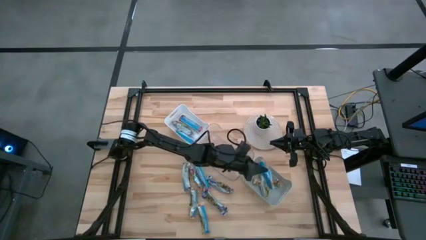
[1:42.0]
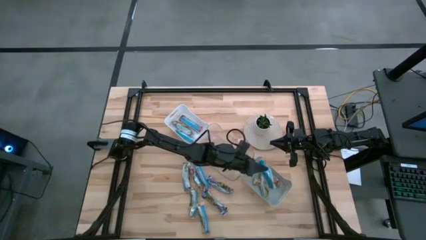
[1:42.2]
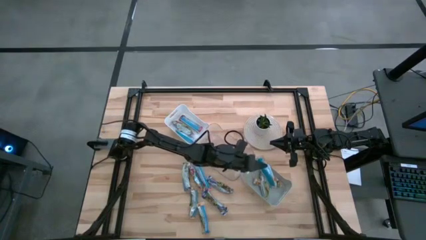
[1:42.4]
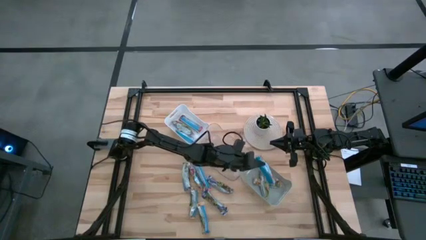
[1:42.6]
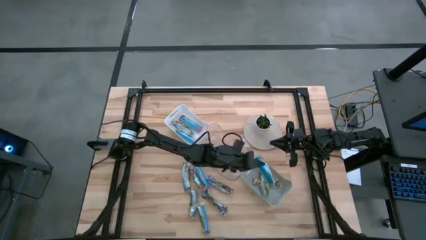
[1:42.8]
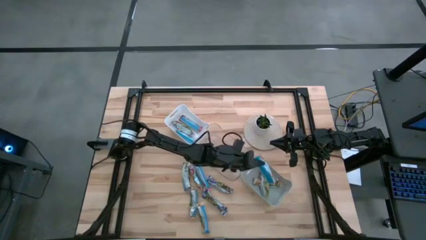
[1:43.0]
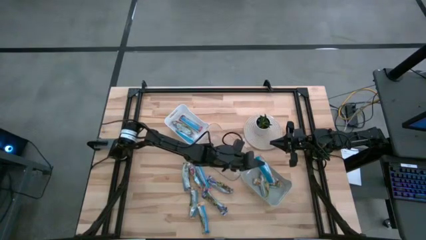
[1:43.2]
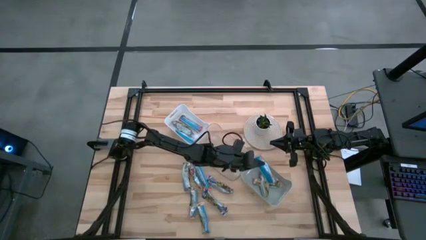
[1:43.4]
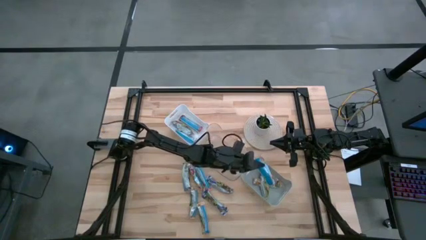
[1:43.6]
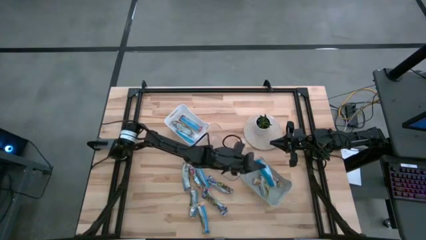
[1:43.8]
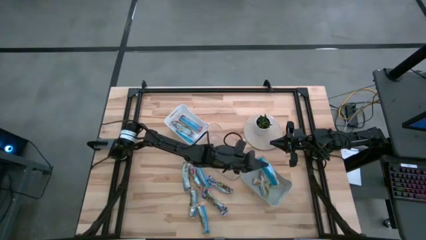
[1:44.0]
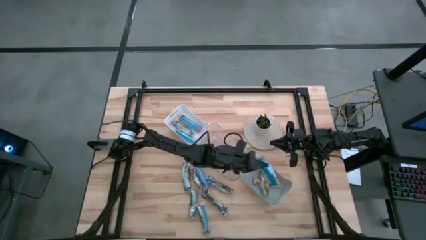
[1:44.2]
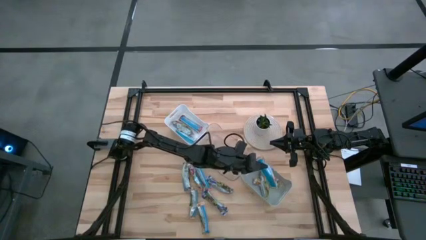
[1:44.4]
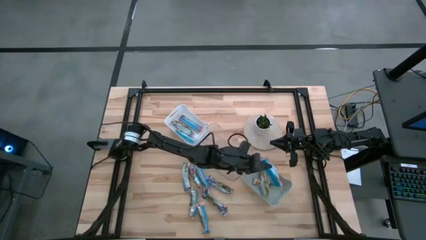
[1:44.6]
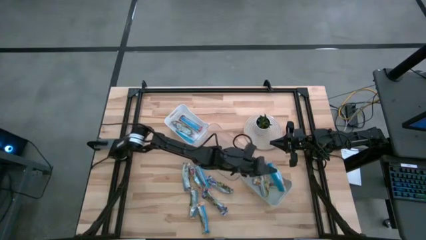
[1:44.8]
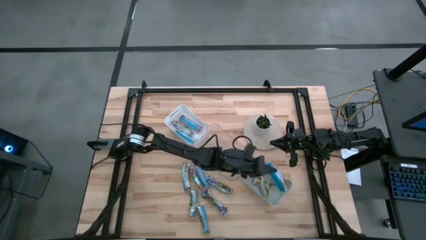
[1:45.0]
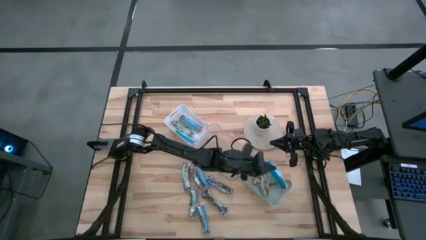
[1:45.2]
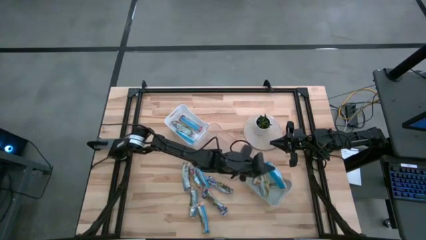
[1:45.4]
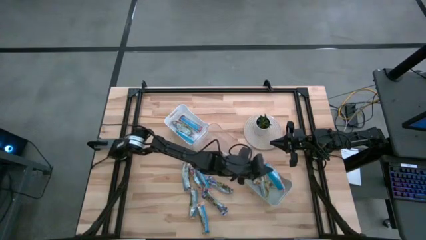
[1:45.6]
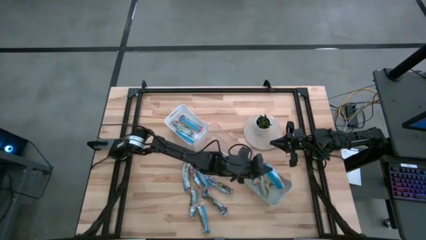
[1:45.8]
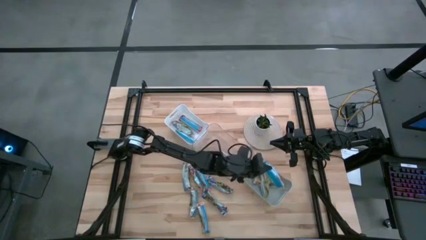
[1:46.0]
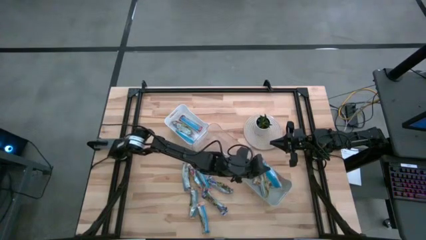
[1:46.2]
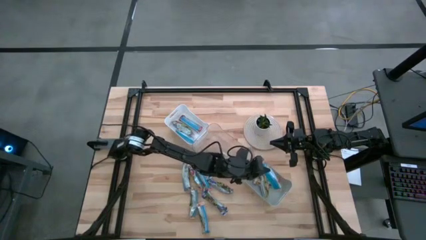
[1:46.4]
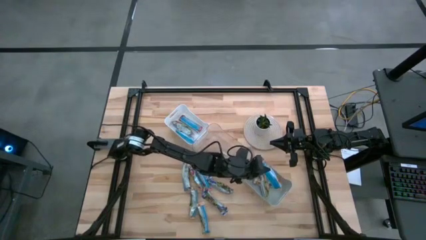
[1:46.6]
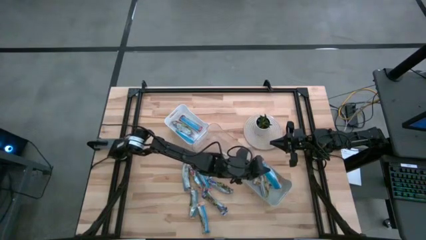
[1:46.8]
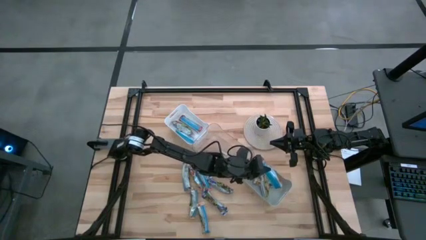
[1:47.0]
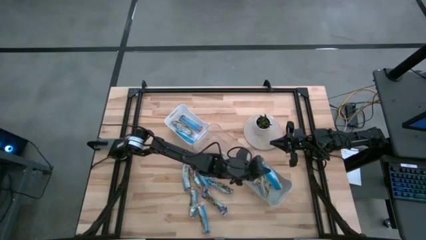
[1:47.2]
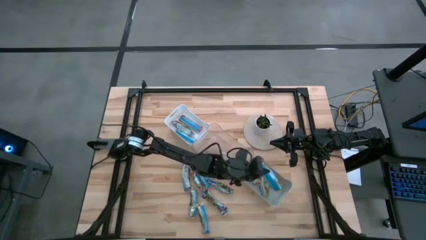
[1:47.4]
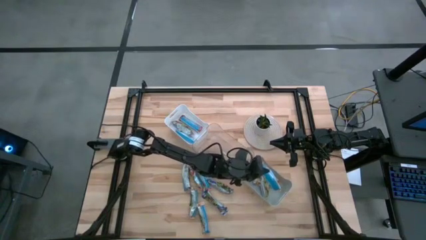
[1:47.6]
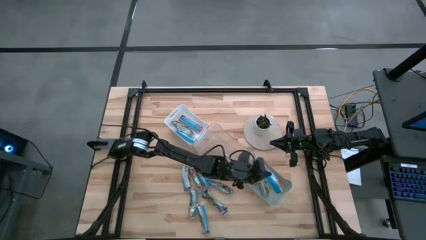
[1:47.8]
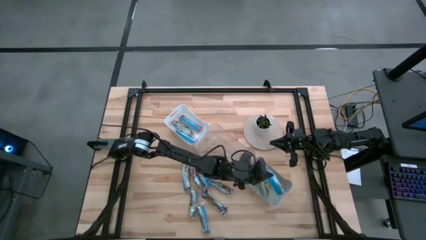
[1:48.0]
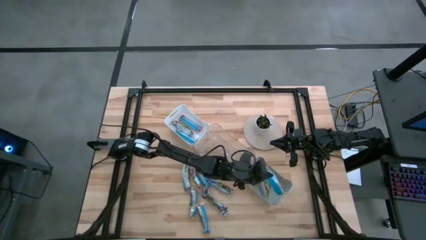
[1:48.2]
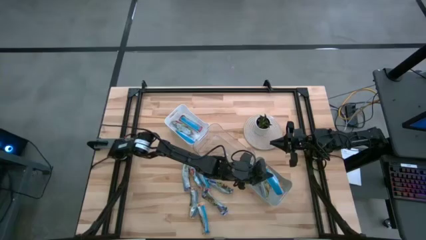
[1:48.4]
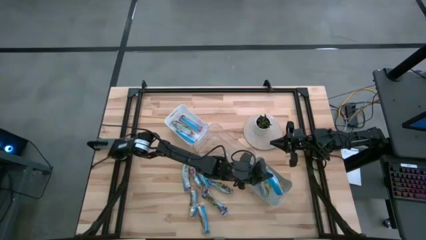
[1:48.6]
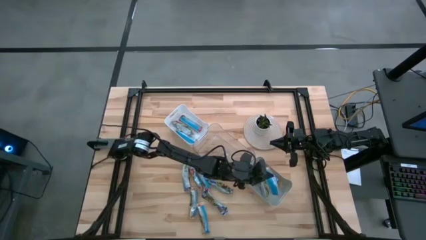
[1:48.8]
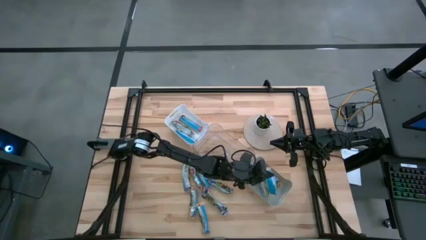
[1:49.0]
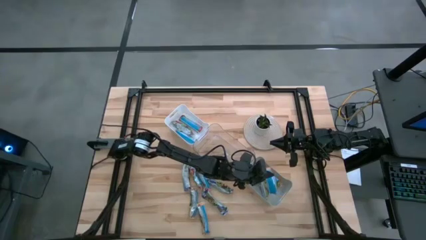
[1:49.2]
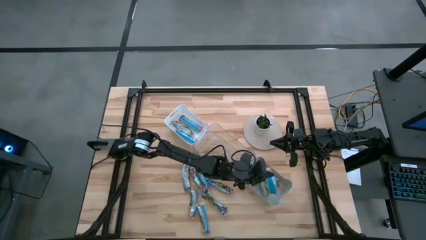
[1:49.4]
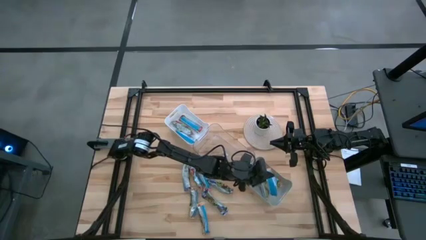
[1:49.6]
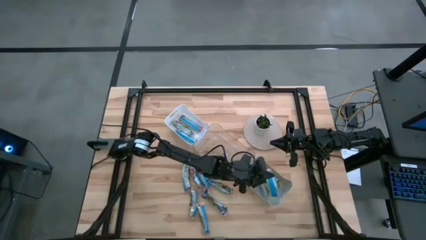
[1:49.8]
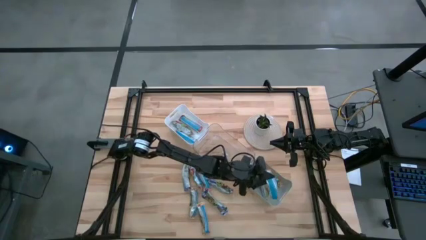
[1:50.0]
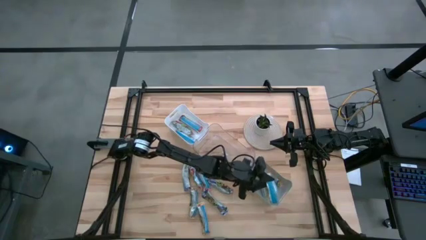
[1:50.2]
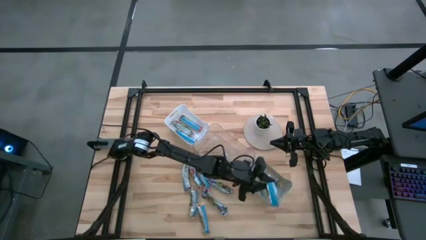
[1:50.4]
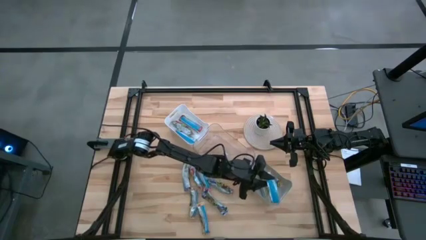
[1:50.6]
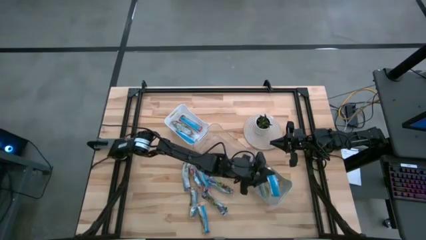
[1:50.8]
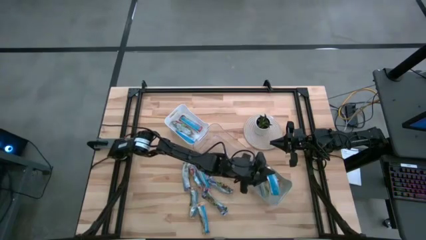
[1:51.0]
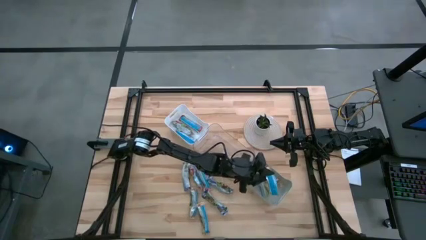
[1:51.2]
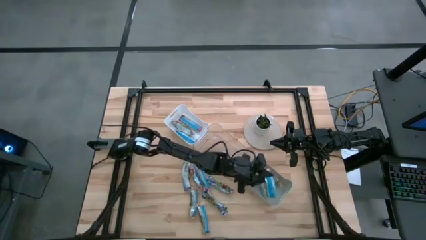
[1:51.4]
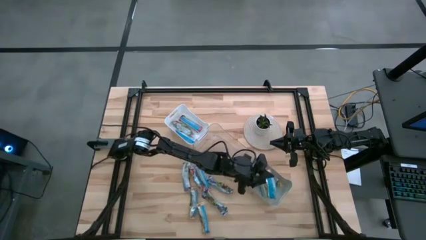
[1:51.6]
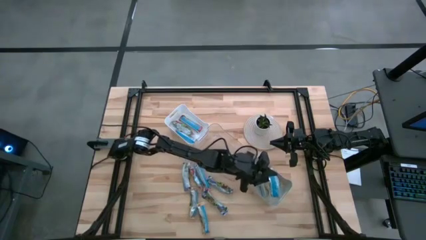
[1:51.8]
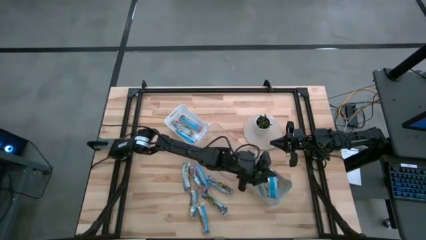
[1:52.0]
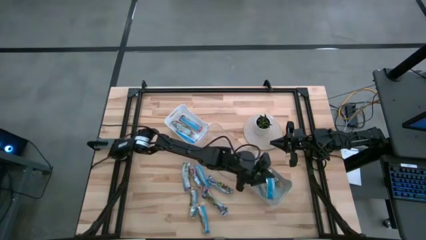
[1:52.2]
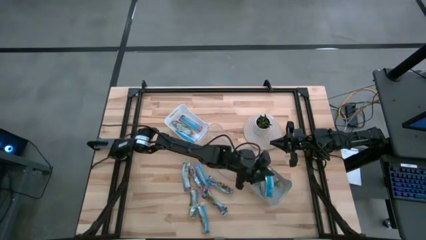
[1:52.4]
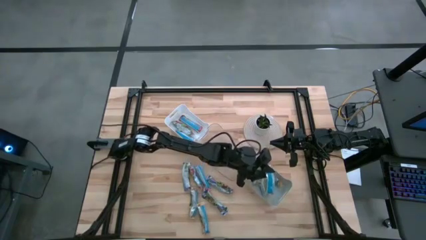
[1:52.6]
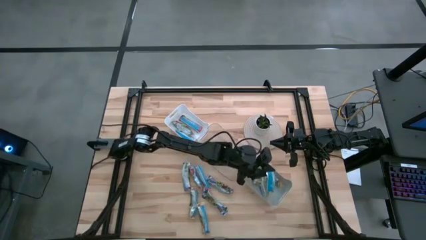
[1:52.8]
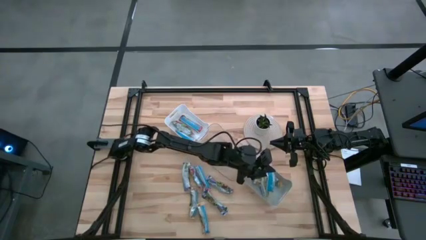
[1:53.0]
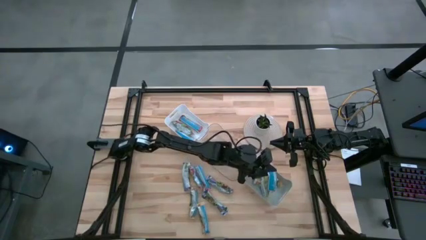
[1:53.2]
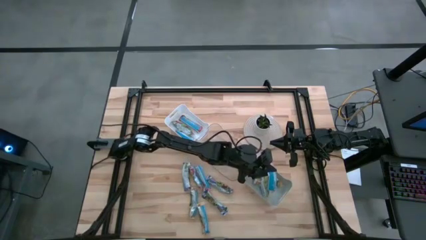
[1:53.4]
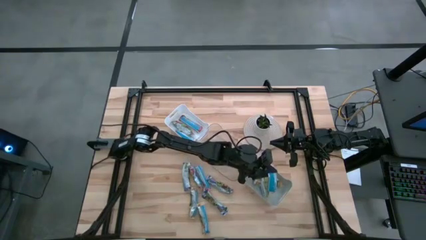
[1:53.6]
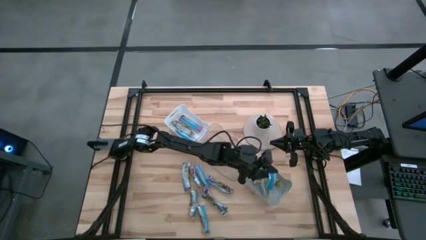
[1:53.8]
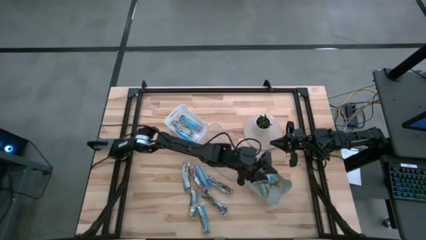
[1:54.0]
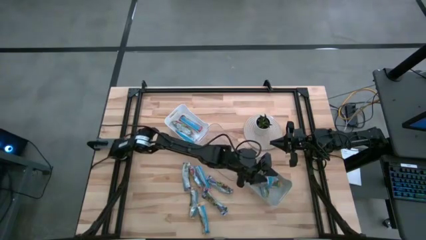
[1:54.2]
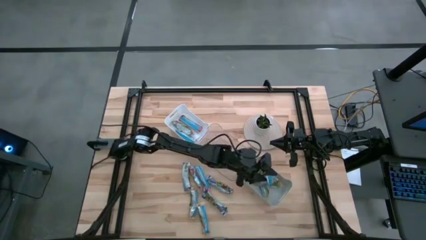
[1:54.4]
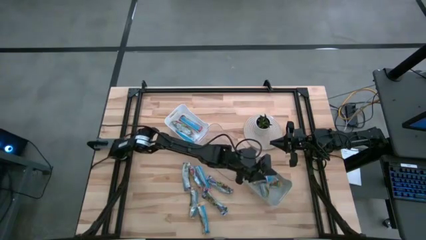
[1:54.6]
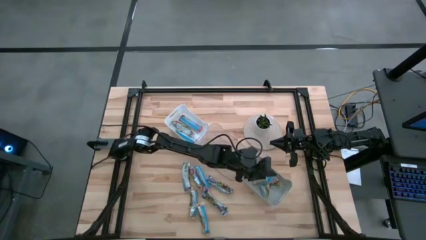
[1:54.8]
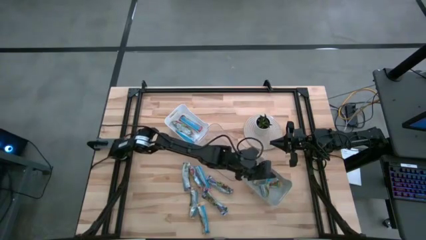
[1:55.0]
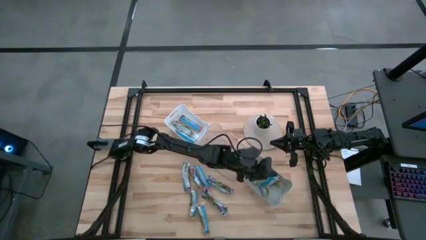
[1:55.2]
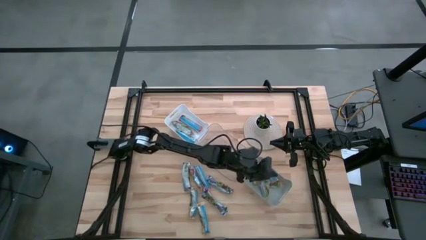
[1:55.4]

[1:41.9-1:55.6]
Task: Pick and place Granola Bars by type
Put the orange granola bar into the gray bin

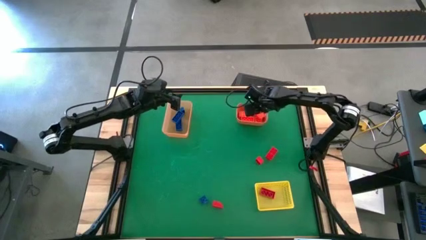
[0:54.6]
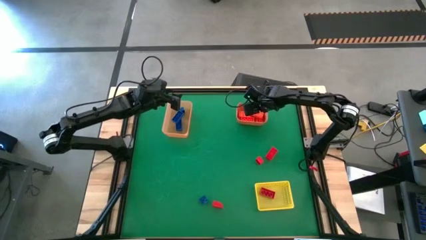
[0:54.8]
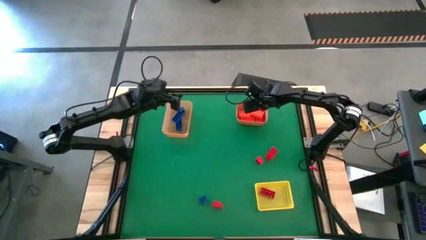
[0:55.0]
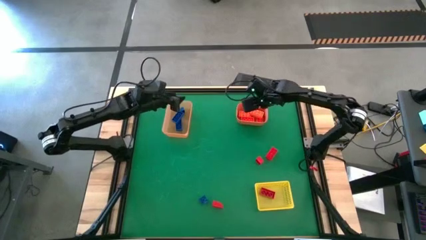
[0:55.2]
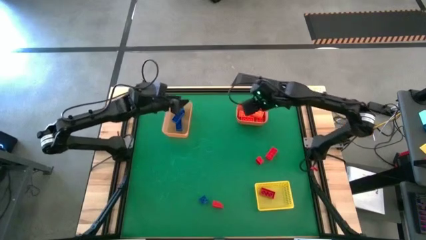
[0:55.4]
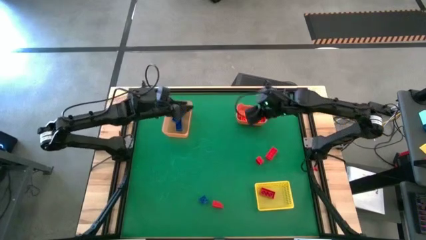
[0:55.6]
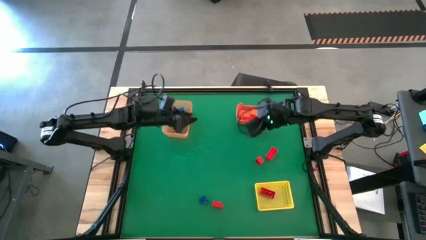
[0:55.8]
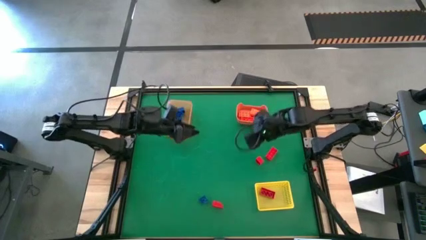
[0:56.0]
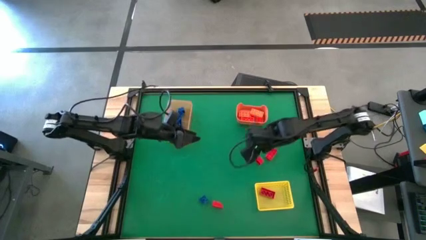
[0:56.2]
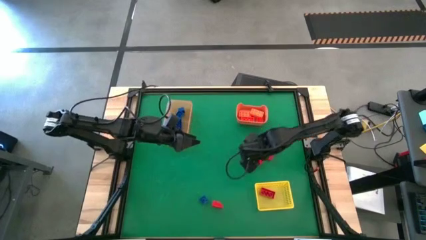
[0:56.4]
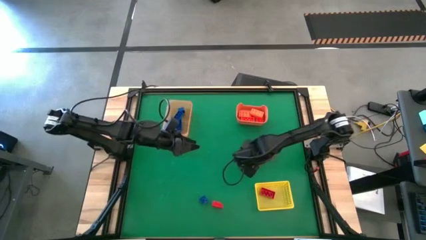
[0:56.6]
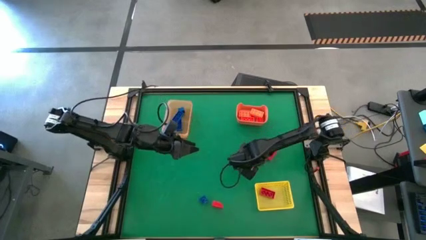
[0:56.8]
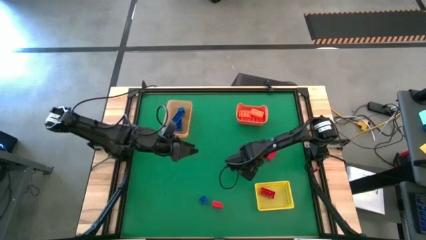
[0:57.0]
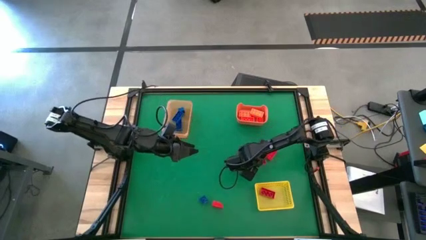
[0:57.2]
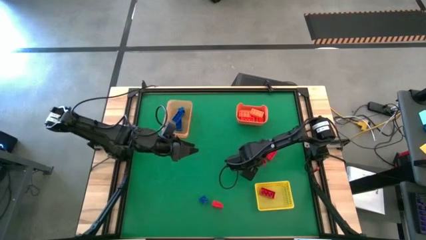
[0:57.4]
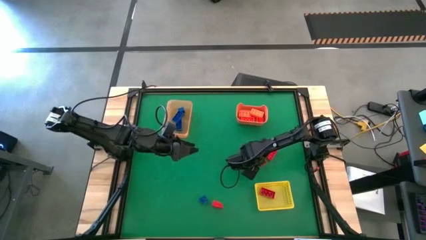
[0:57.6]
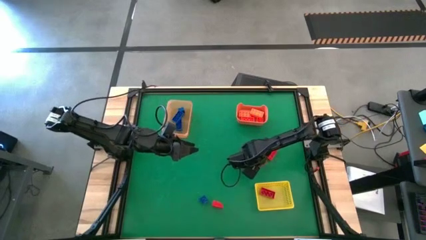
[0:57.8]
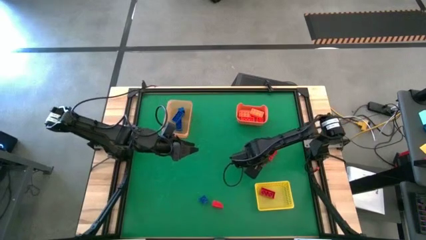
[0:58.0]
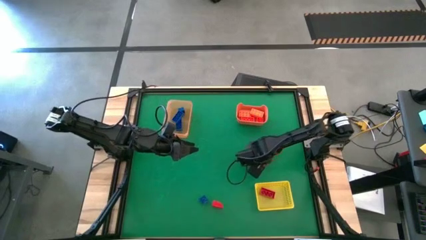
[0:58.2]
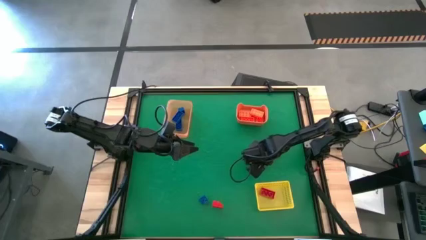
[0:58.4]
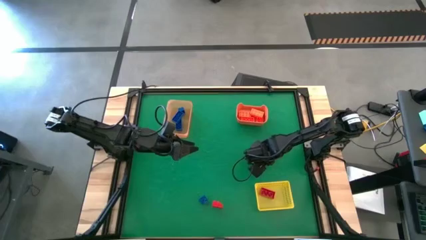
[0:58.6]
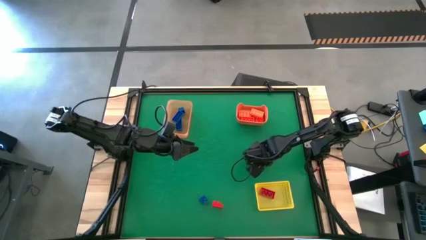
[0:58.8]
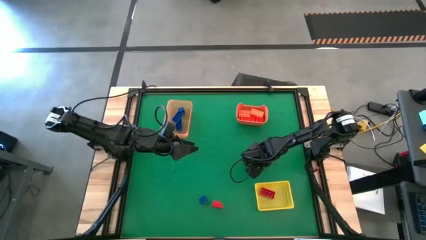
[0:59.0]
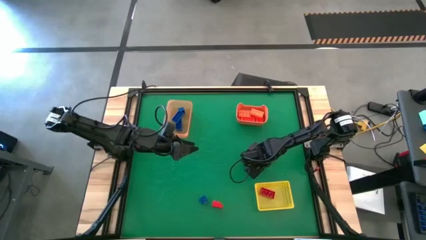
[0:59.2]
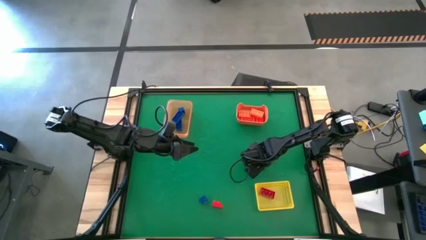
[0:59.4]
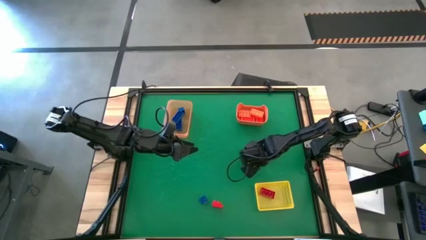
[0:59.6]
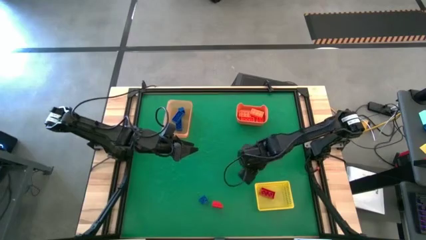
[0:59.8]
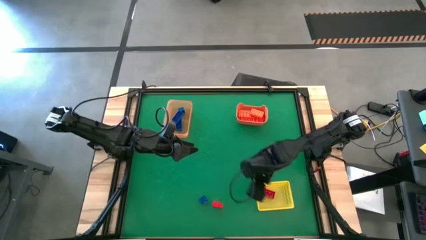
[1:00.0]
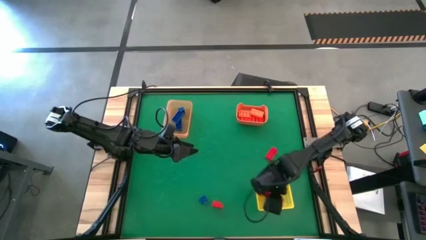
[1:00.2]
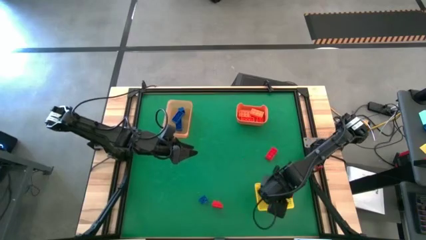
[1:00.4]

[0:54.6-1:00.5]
Task: Sort & place blocks by color
Put the red game piece into the yellow bin
